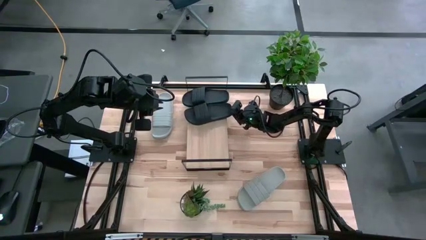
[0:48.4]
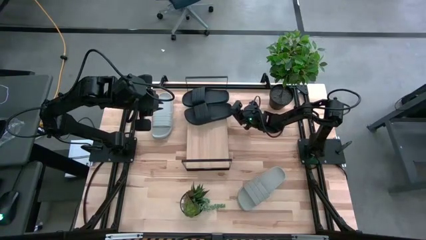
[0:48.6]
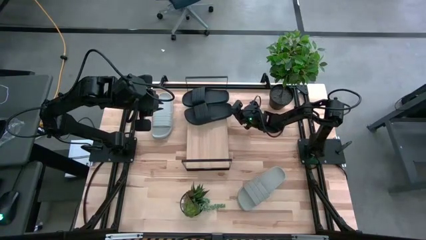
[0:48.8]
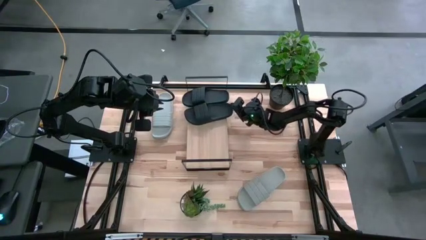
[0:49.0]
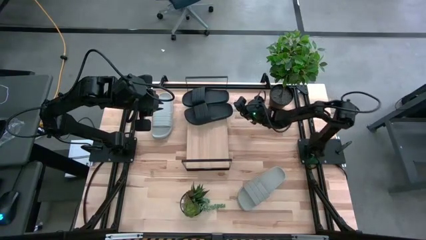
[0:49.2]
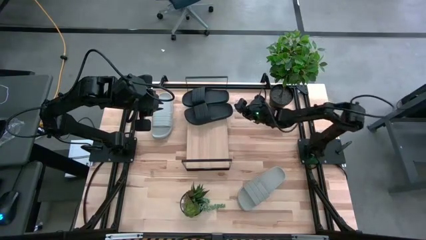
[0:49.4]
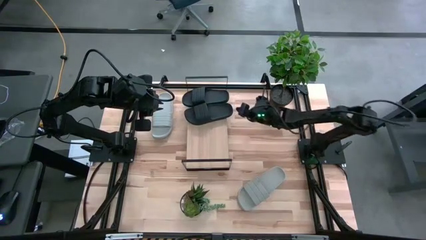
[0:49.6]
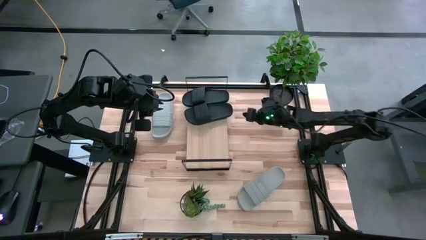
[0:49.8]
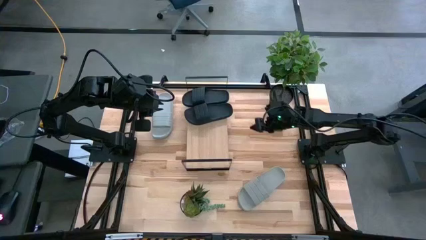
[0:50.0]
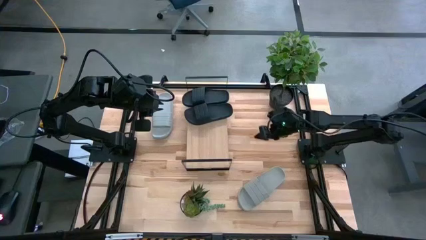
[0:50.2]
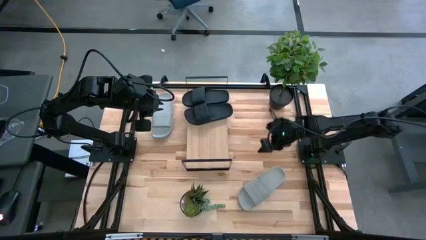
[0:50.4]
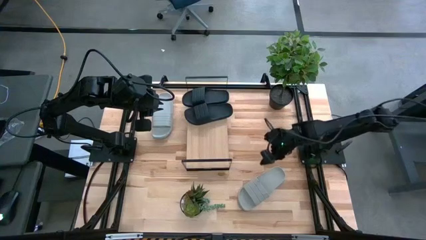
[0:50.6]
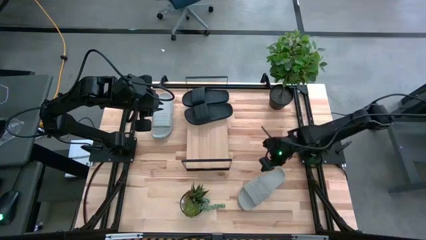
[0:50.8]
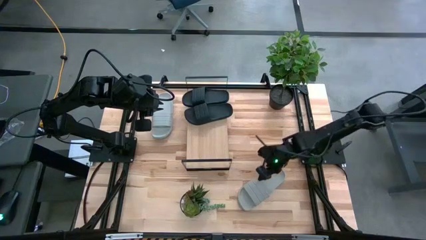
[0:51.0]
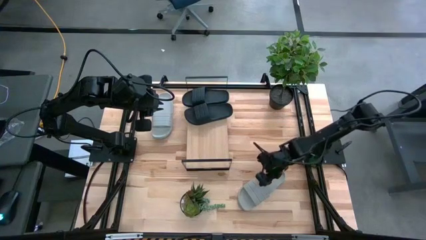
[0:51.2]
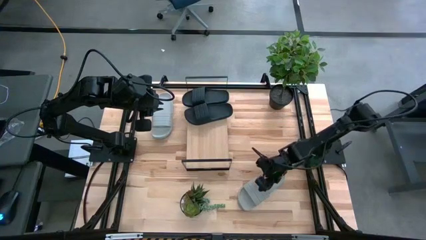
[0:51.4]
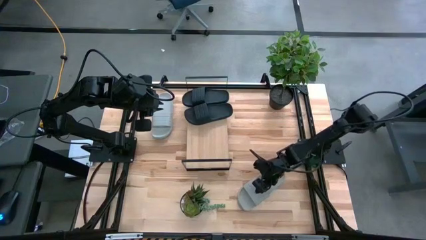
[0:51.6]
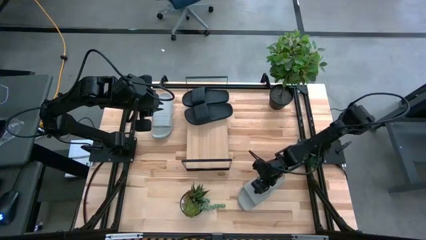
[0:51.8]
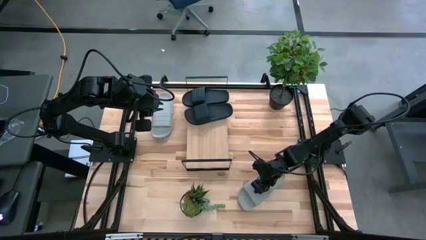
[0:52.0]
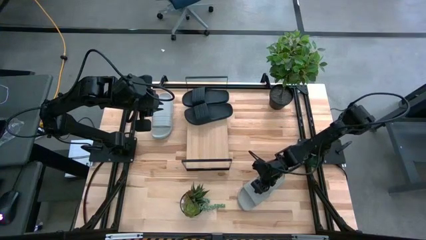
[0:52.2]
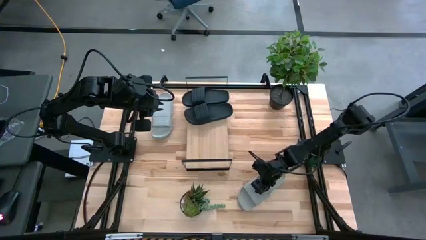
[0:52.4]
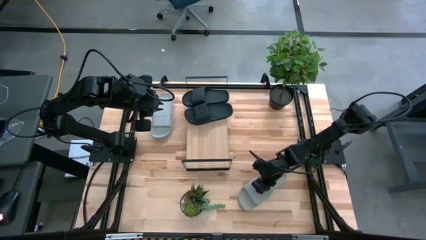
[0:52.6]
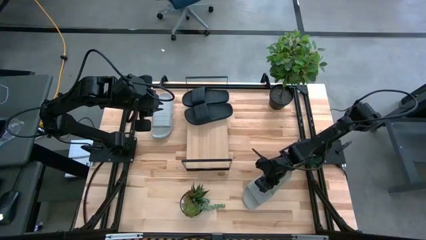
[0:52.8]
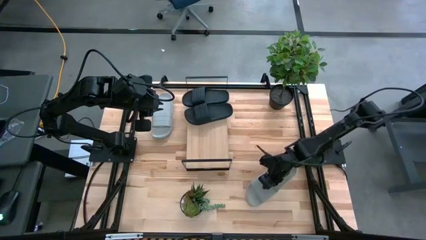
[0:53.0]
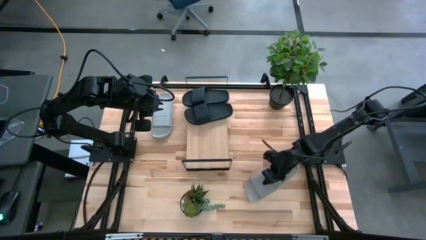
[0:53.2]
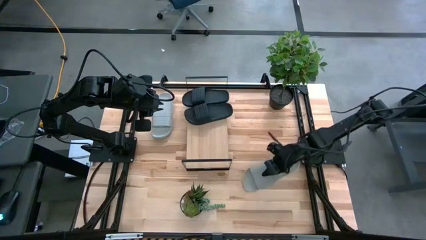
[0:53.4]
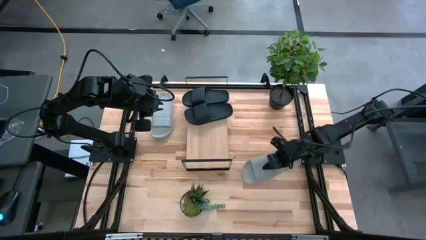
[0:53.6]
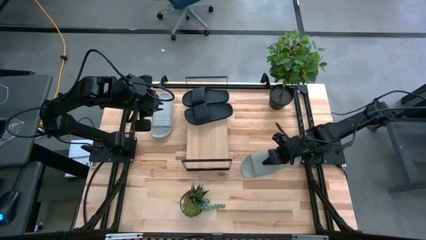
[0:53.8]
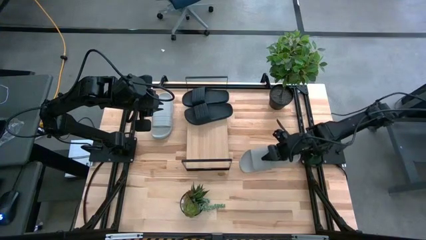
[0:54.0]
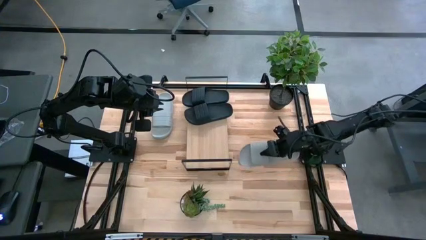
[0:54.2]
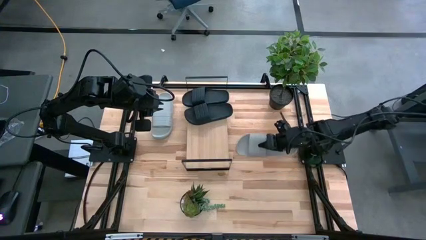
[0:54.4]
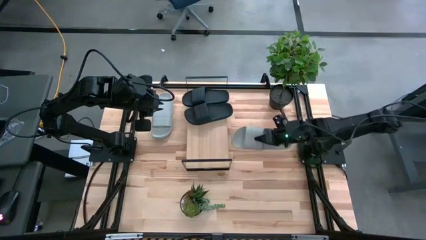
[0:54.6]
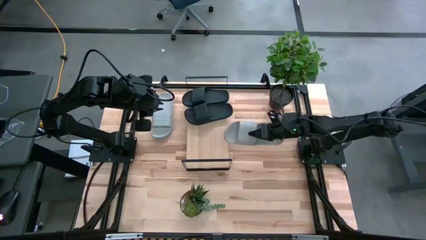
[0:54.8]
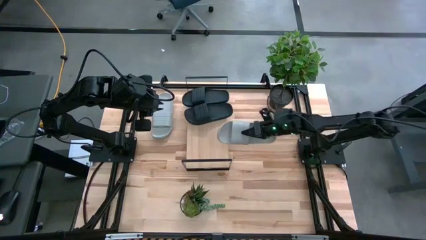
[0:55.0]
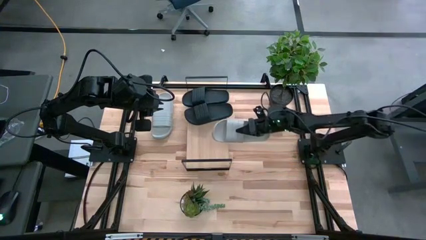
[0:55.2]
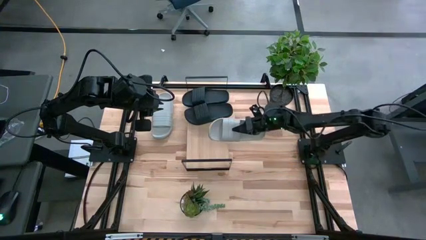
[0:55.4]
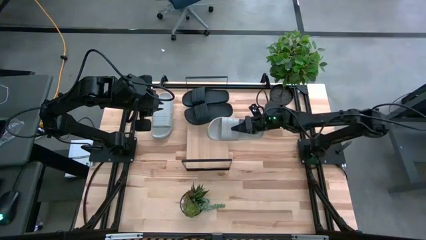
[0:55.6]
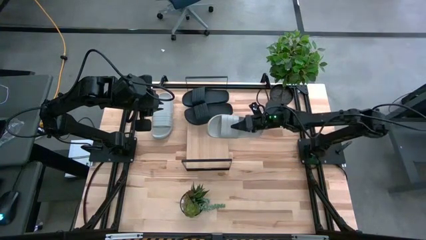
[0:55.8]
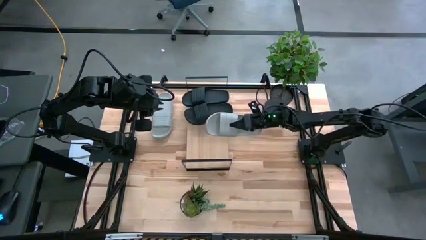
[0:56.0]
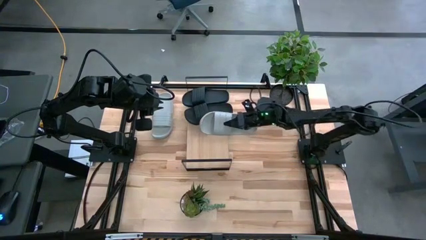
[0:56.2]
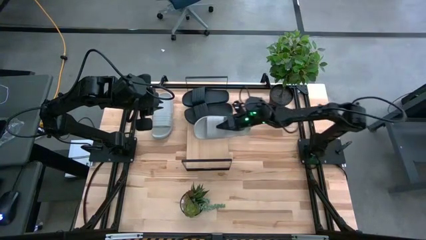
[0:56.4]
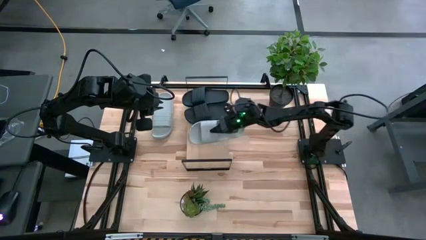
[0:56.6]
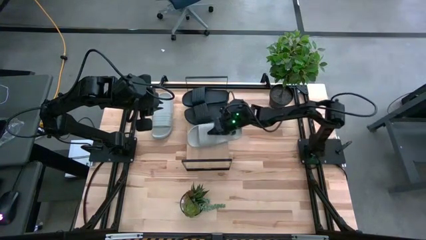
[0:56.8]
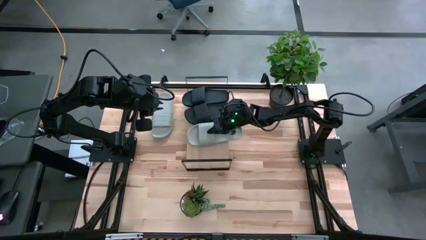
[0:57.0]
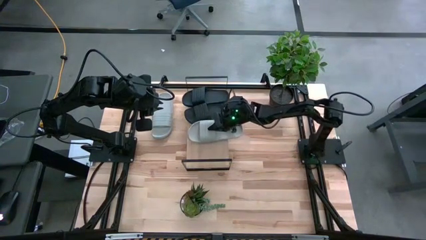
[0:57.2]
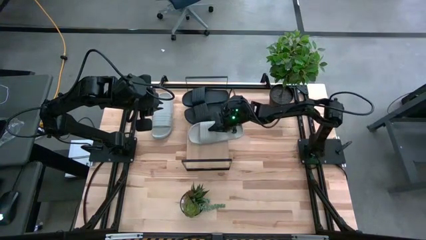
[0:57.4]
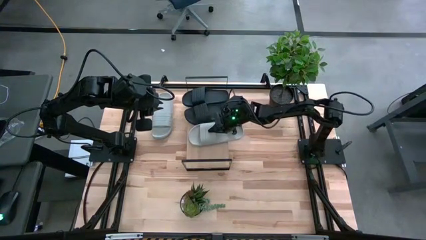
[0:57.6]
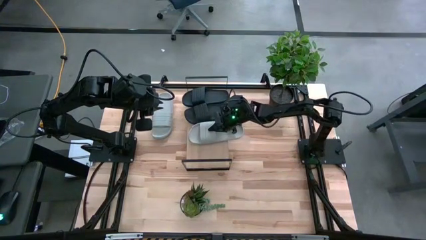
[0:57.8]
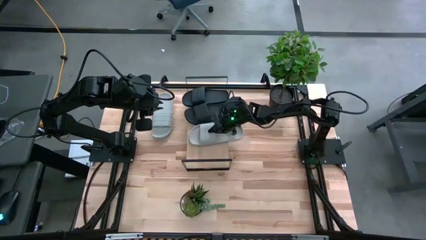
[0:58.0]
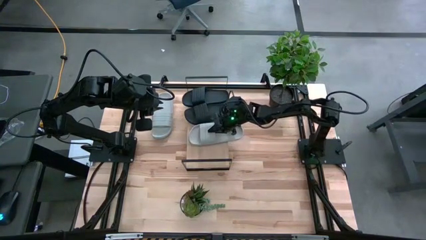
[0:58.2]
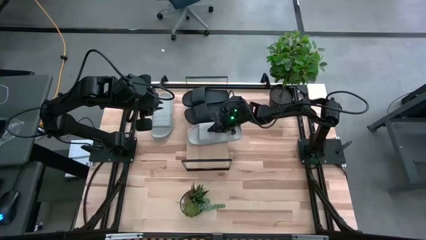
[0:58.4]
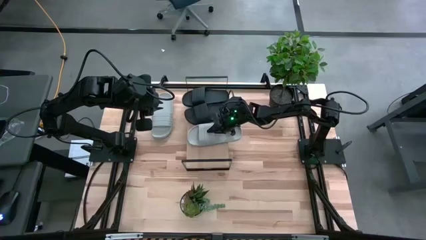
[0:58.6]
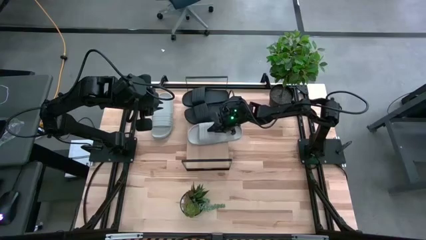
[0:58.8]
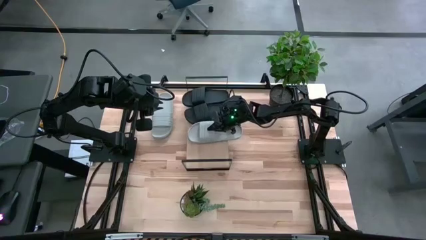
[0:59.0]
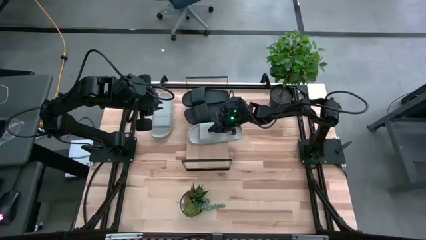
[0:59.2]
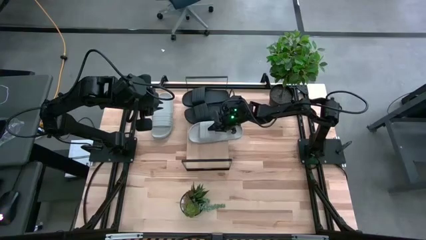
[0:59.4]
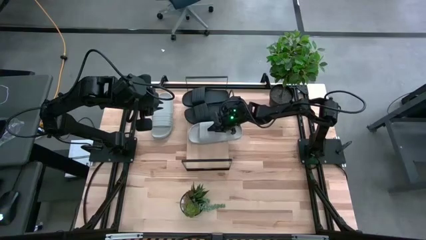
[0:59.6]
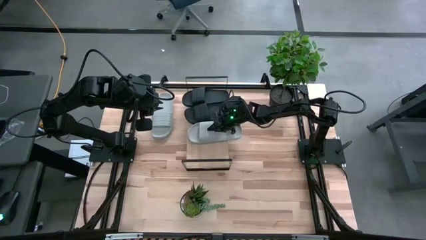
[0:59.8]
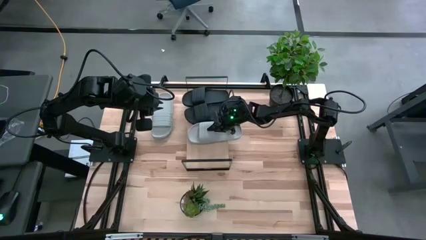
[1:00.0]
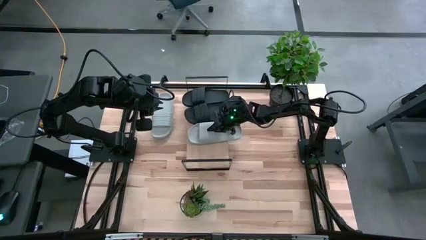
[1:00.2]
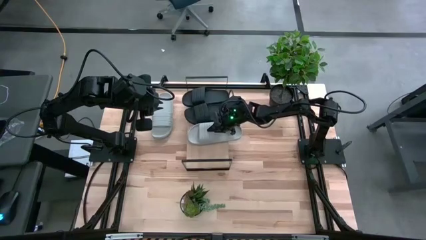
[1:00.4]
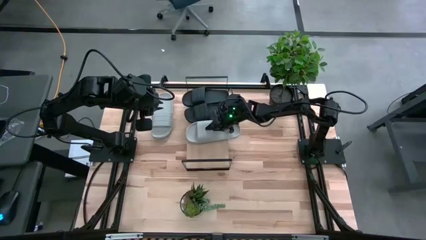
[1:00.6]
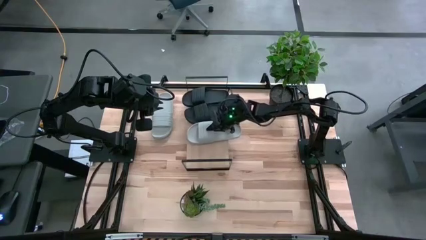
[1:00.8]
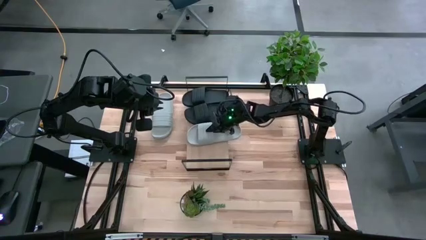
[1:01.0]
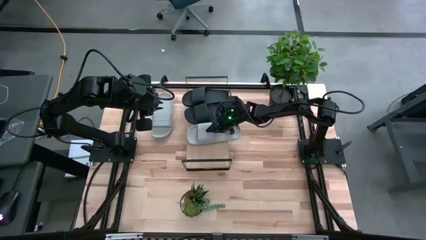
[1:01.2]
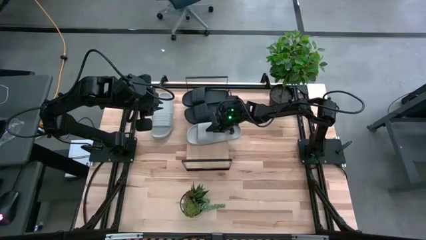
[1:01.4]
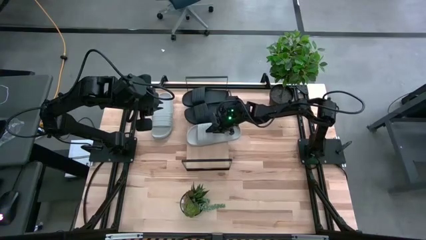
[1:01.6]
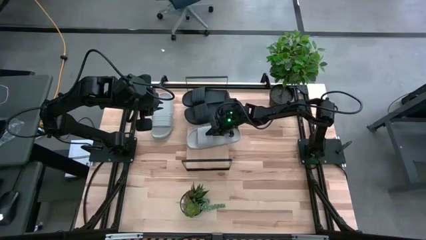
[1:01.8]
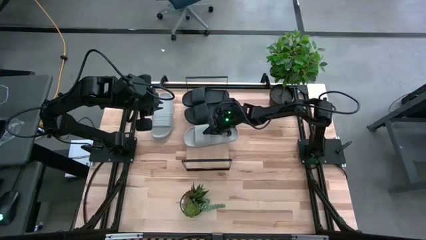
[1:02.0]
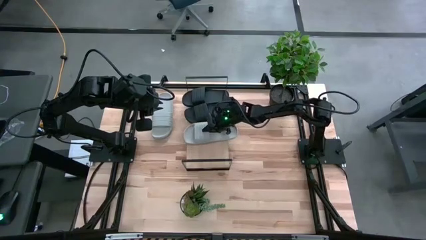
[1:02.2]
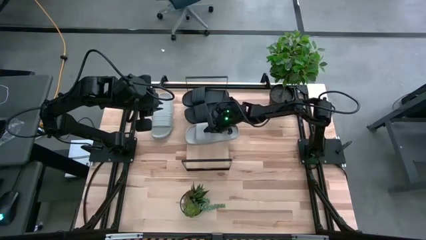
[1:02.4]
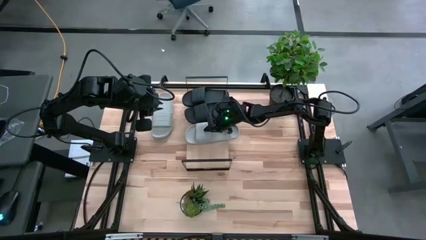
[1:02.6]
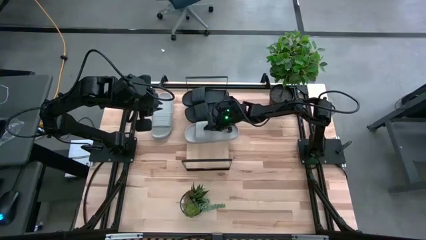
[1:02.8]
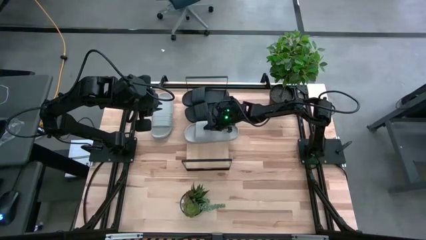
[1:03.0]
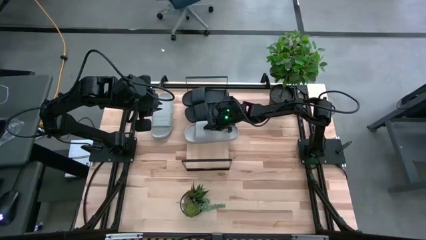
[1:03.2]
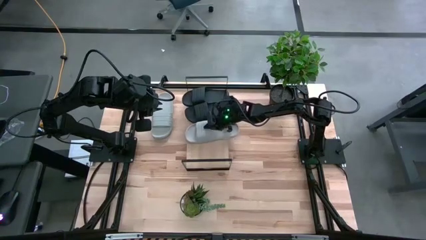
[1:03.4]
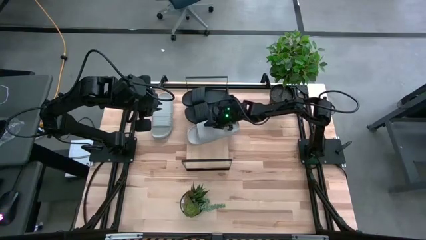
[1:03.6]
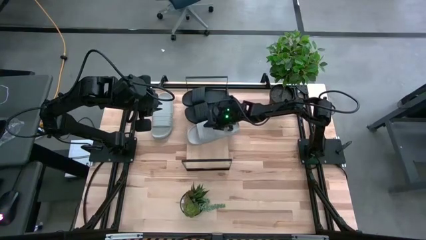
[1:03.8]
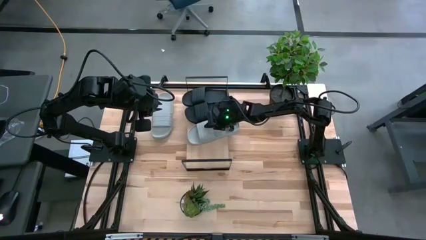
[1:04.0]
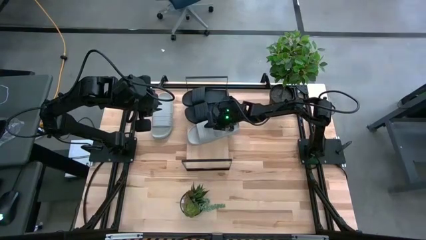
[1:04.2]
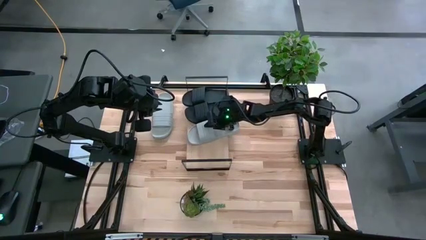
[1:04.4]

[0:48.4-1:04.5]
Task: Pick and place slides into the shelf
Put the bottom gray slipper slide on the shelf
